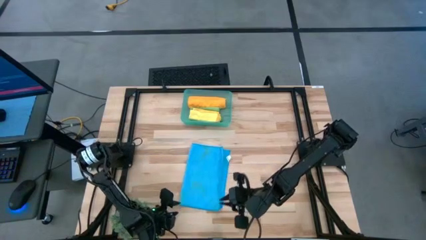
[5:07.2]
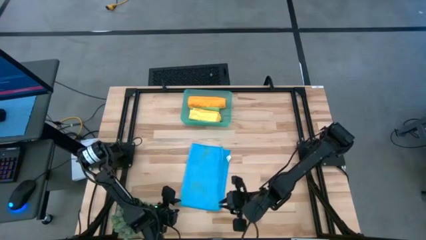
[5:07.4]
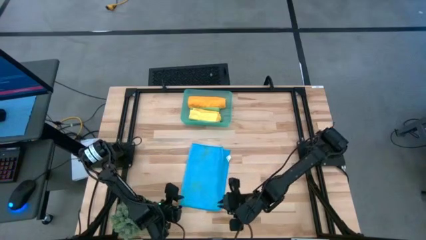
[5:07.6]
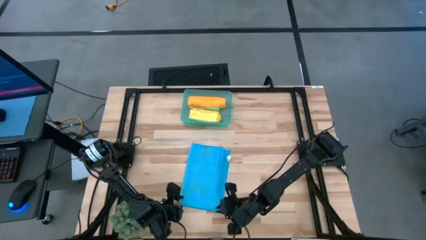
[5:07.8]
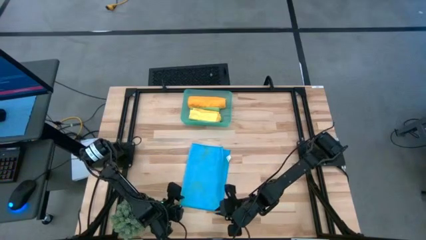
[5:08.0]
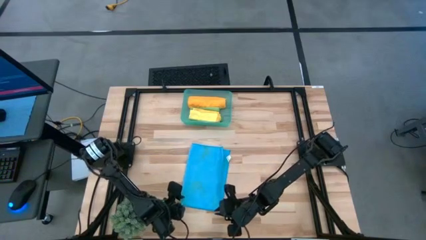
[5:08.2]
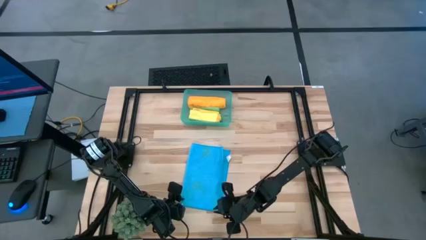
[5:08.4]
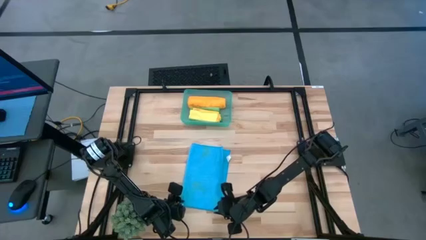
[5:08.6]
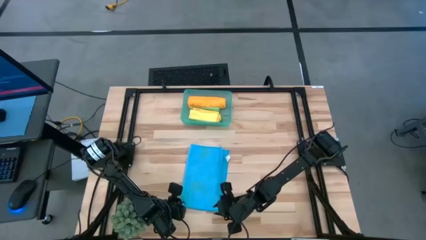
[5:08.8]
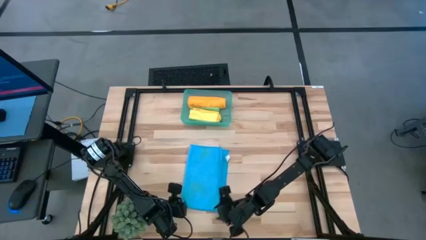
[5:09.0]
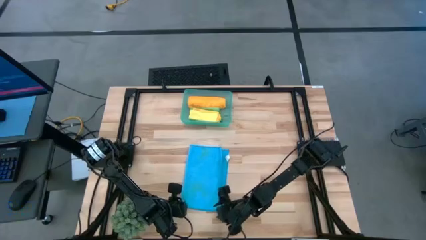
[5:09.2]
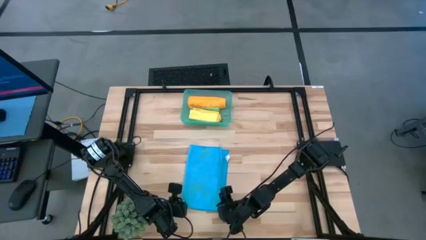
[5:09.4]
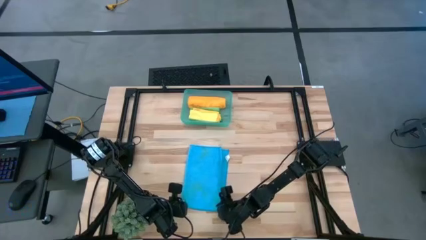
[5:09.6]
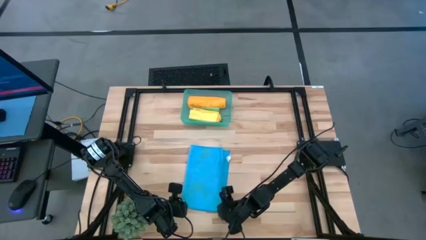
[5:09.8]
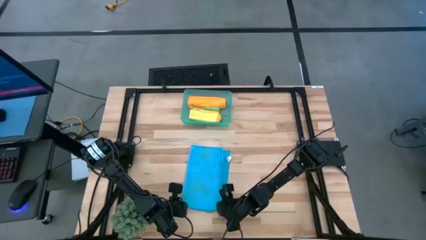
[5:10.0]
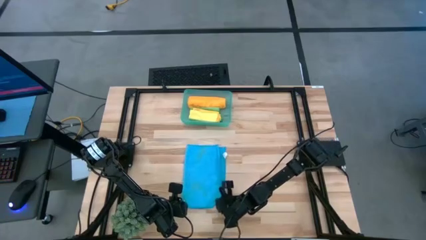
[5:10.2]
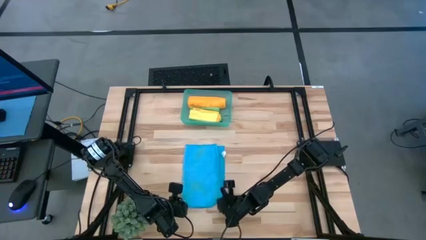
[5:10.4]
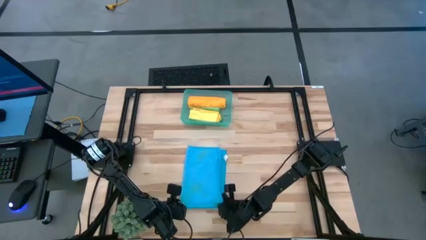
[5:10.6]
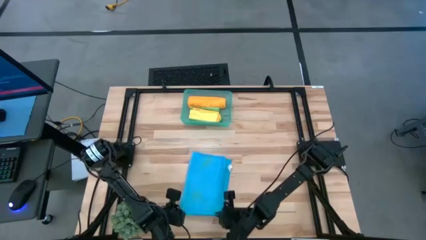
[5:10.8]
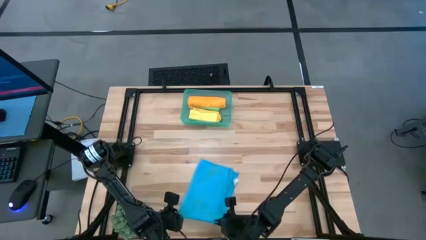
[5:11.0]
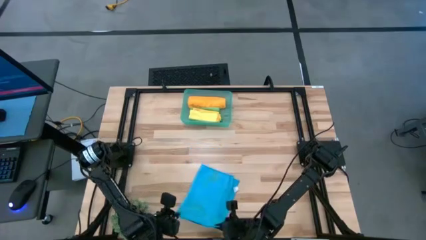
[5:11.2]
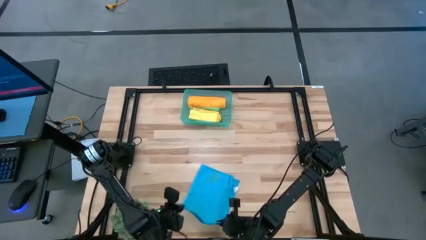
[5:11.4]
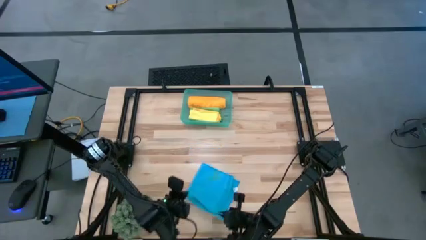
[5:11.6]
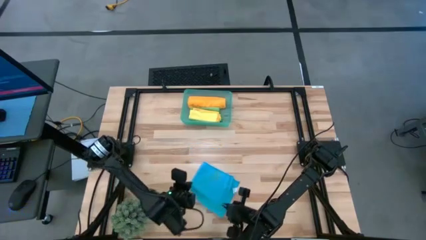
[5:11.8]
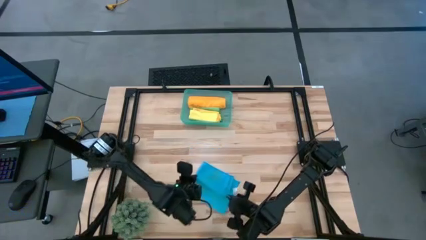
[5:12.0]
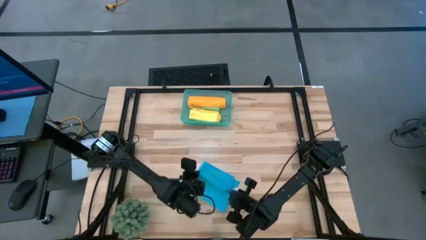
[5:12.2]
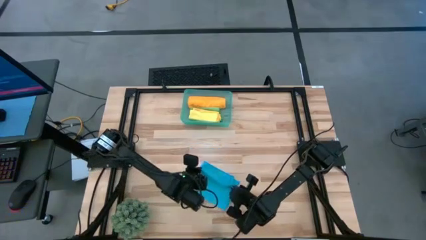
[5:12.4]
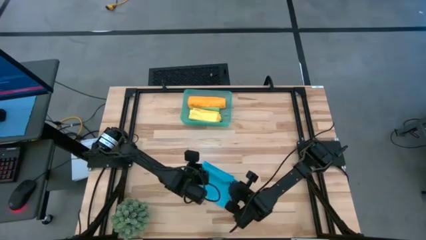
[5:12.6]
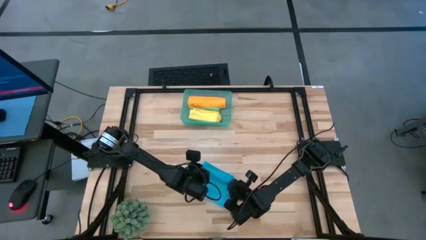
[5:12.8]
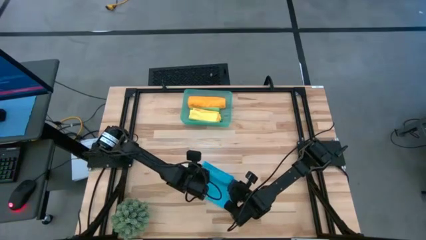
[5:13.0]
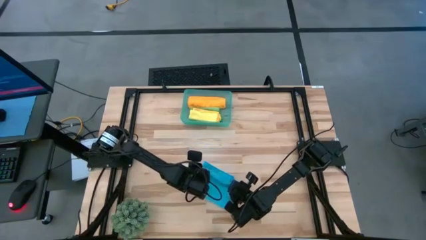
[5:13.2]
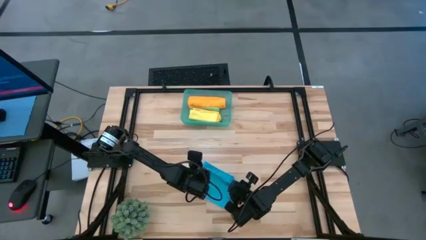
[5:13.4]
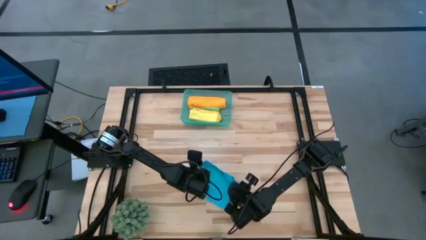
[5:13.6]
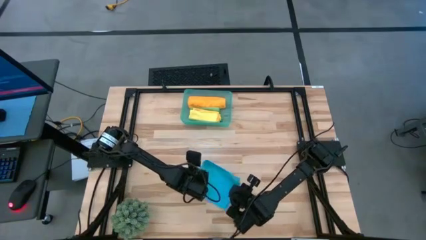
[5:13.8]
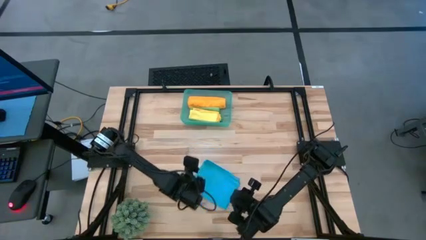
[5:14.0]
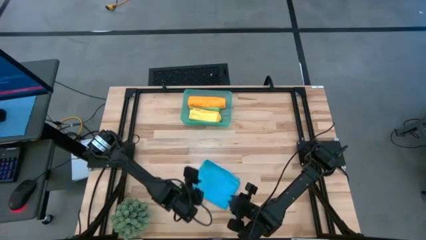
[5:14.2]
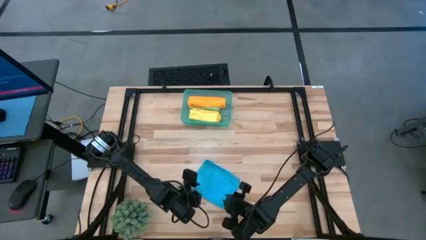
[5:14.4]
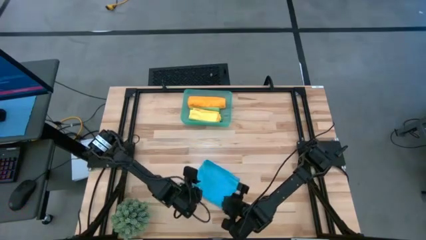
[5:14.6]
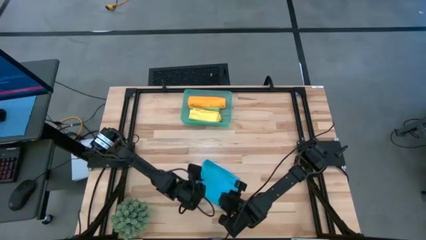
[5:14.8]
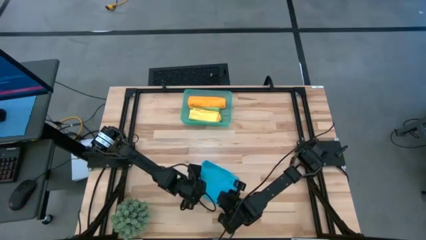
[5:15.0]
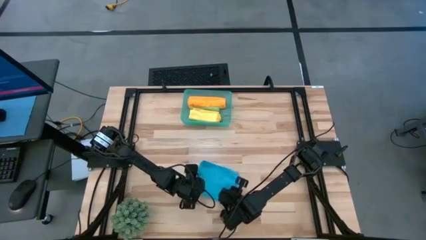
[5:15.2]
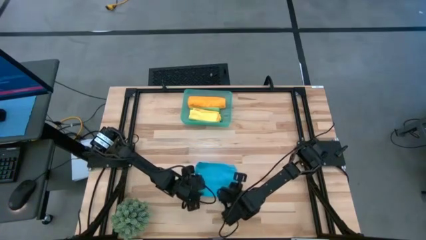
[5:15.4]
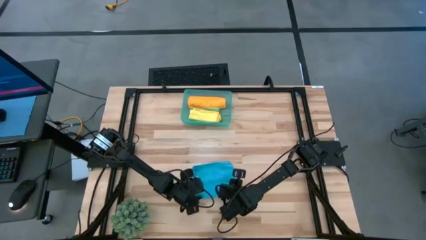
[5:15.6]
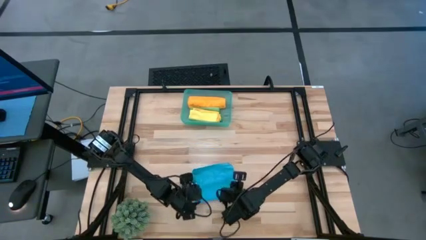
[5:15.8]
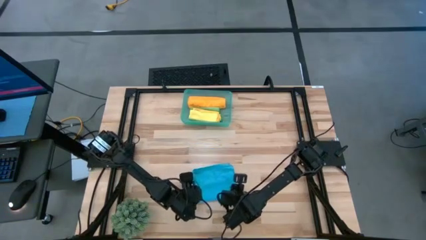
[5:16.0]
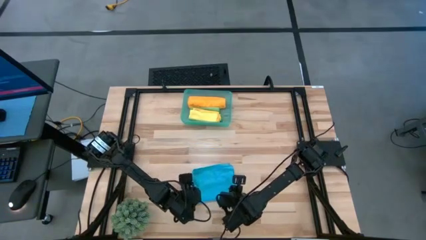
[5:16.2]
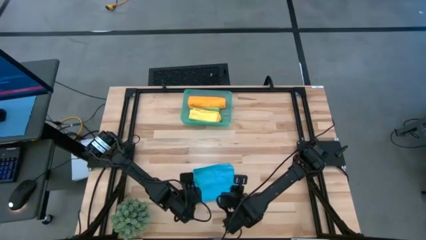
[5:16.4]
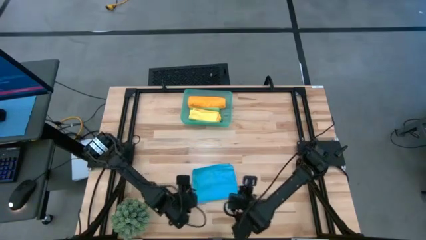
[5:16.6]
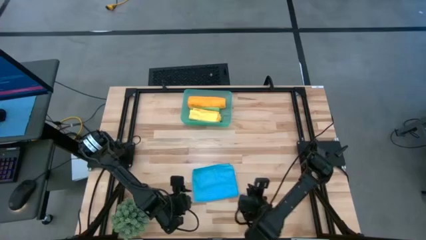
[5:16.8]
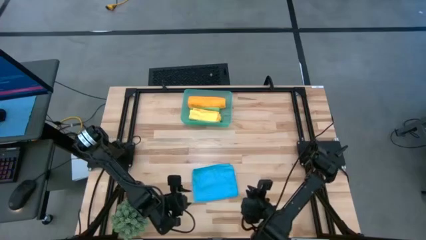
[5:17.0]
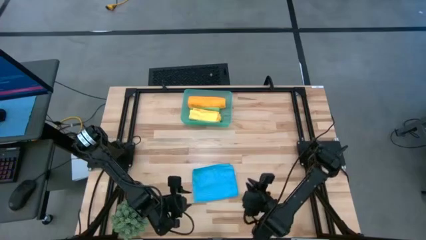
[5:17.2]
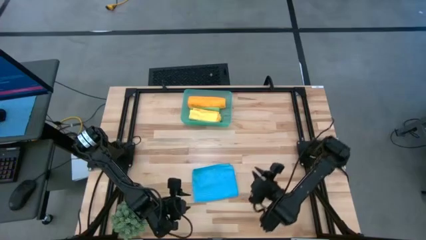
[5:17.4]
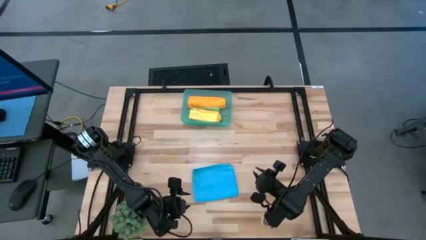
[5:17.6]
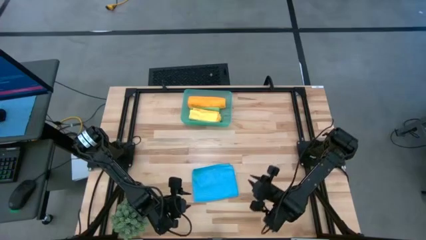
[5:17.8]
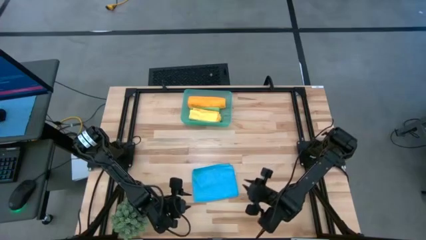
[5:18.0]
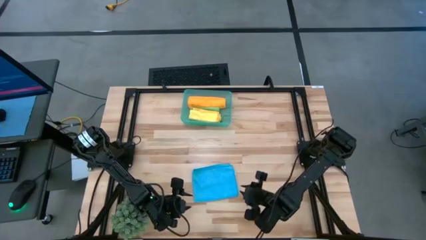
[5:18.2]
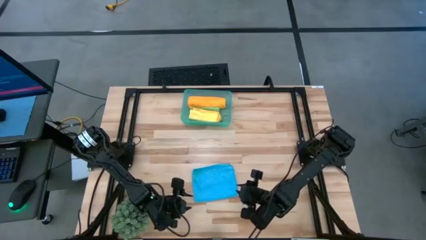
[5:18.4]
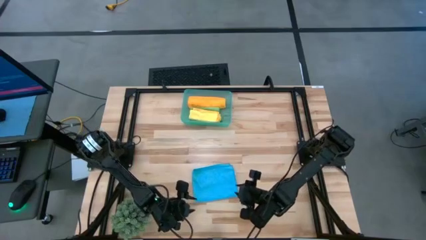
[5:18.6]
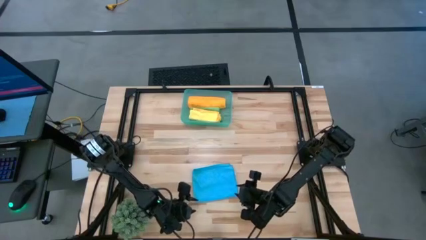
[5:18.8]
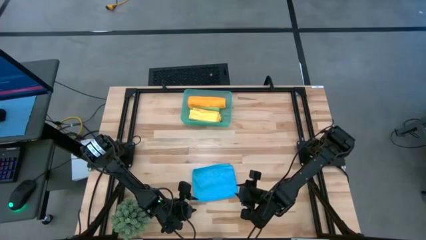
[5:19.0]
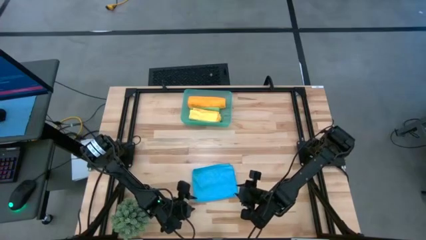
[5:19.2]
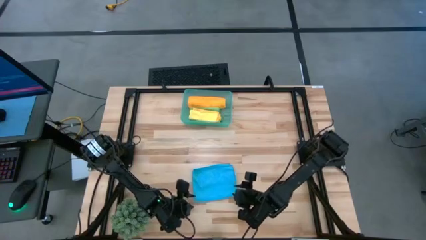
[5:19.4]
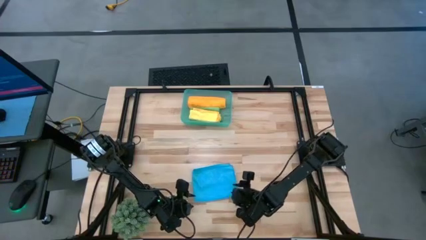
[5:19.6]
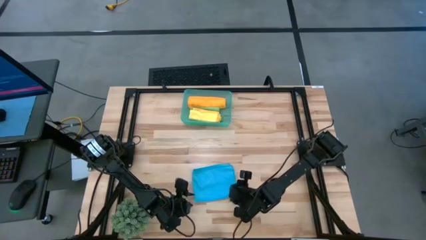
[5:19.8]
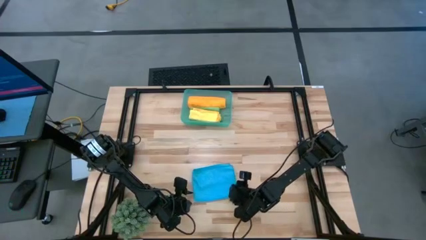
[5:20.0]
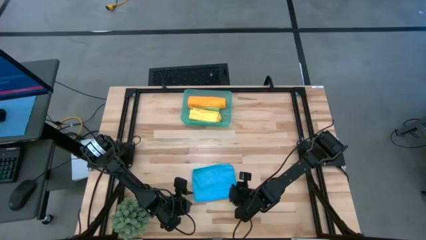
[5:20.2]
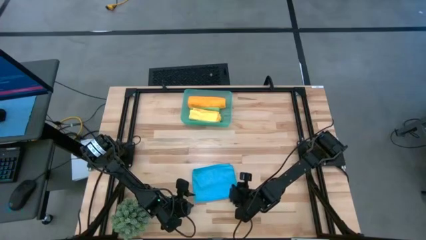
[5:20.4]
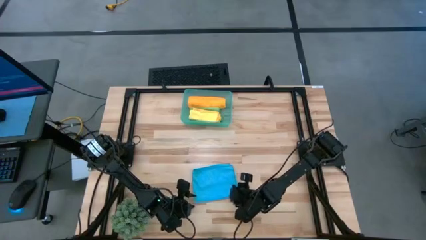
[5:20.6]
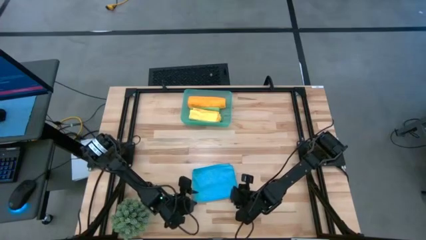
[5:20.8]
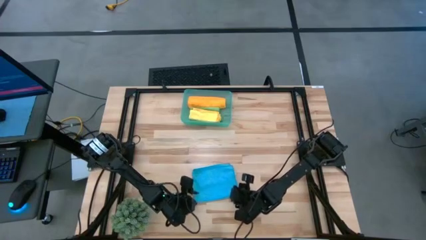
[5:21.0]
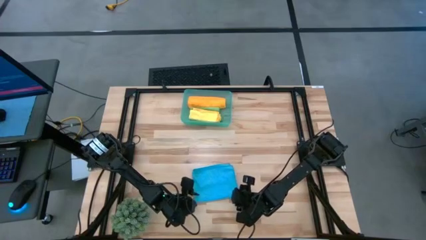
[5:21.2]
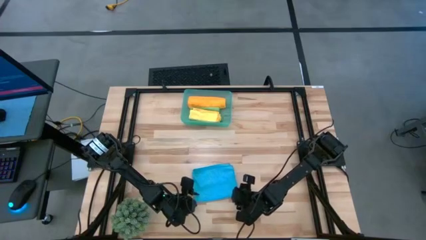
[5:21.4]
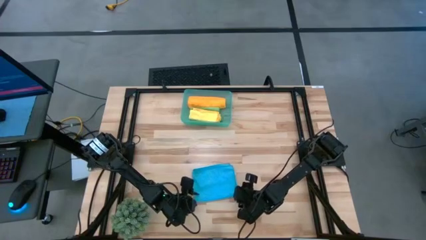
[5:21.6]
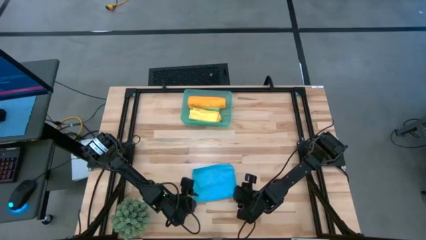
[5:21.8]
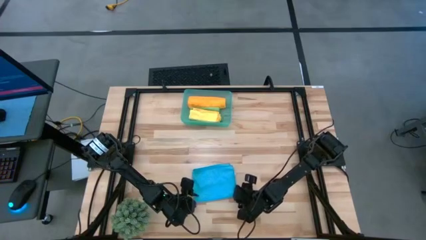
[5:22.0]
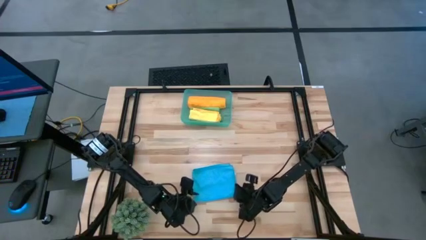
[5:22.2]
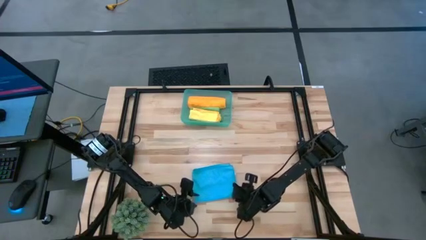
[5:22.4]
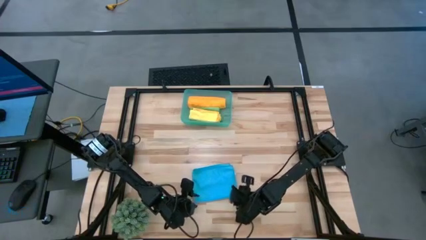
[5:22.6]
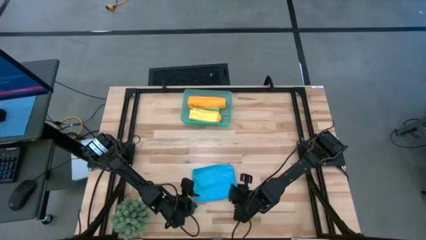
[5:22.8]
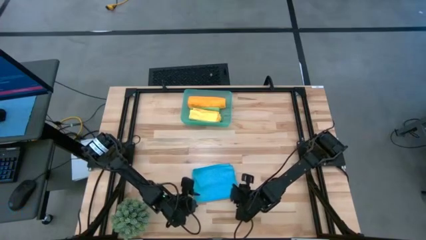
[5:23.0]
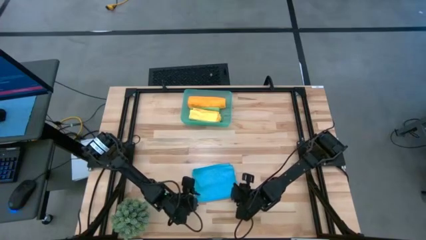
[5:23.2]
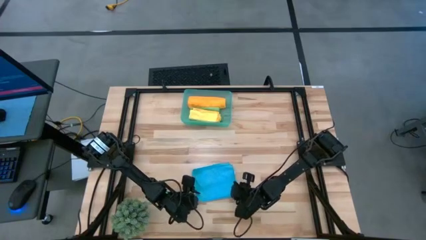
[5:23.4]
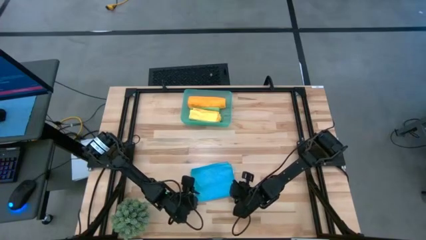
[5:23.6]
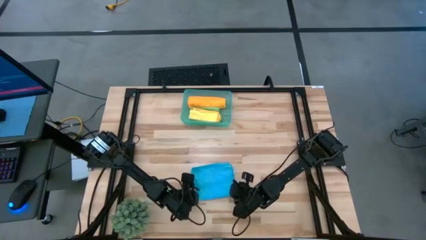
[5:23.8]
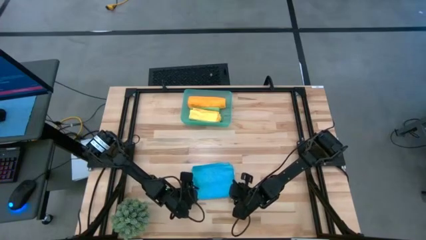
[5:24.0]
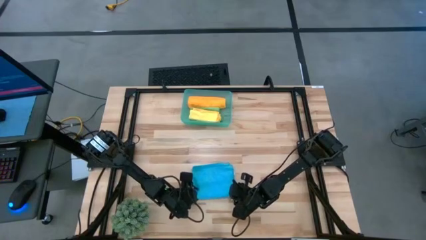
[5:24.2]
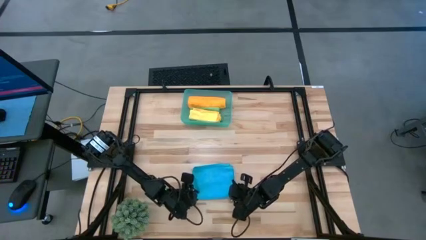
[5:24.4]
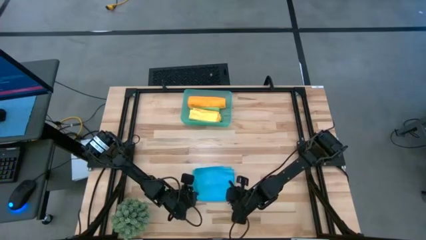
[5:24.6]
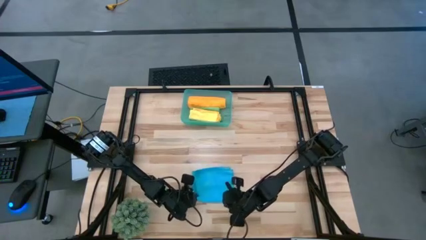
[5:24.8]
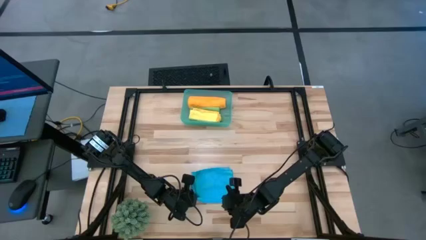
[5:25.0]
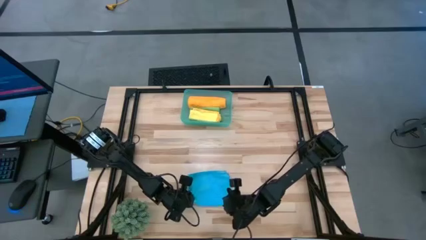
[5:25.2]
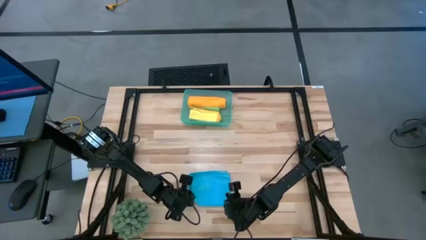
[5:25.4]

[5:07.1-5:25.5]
Task: Roll microfiber towels into tight, uniform cylinder then place into a basket
Fold the blue towel
